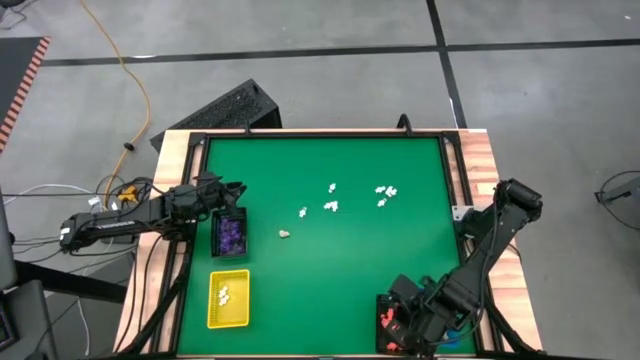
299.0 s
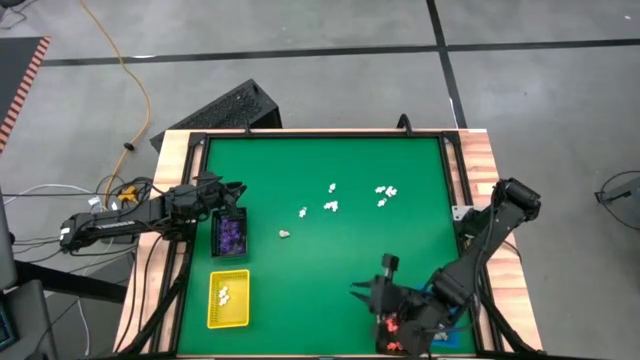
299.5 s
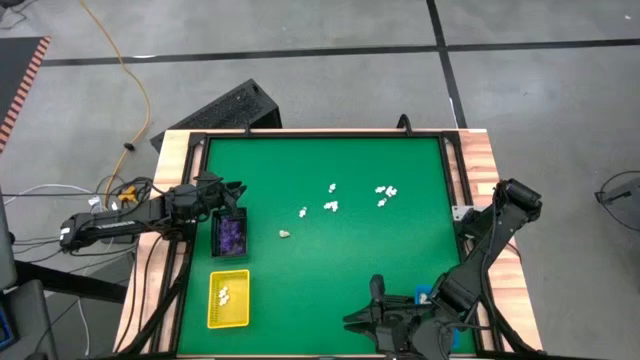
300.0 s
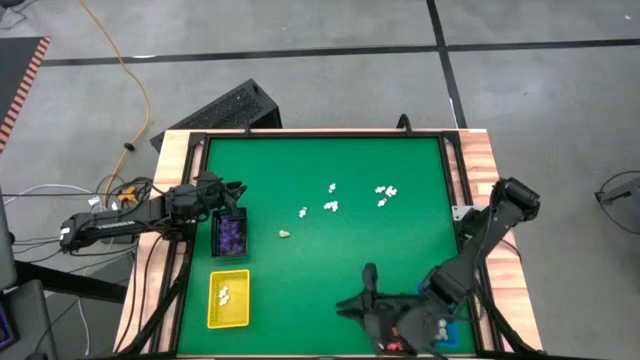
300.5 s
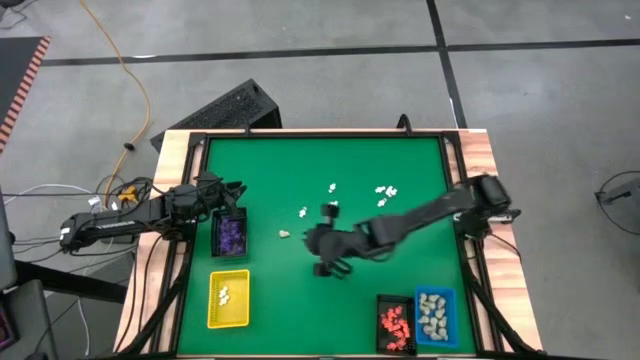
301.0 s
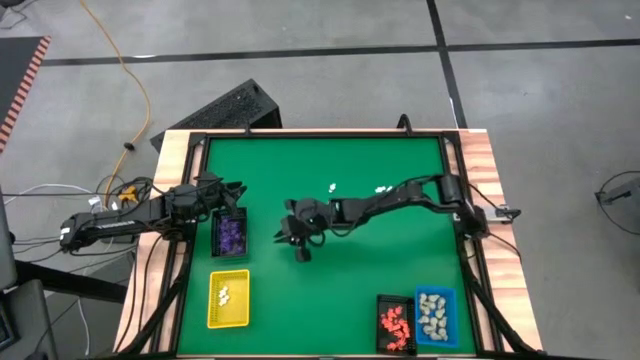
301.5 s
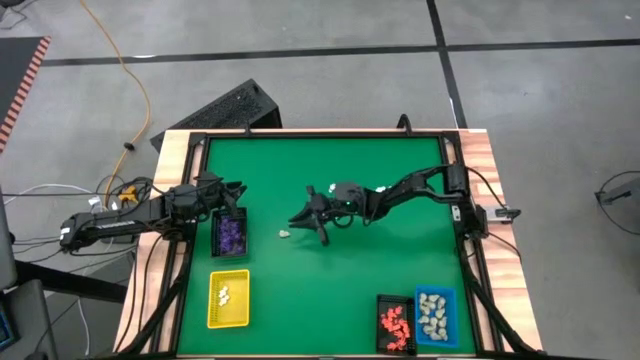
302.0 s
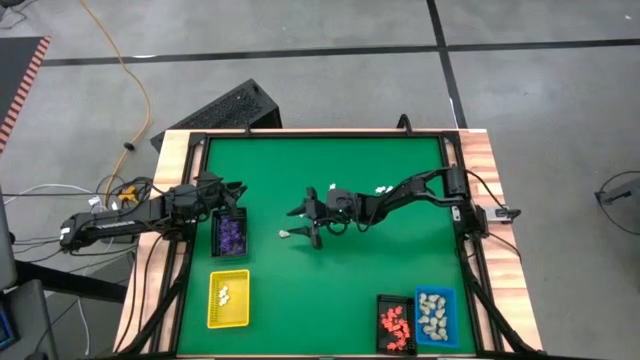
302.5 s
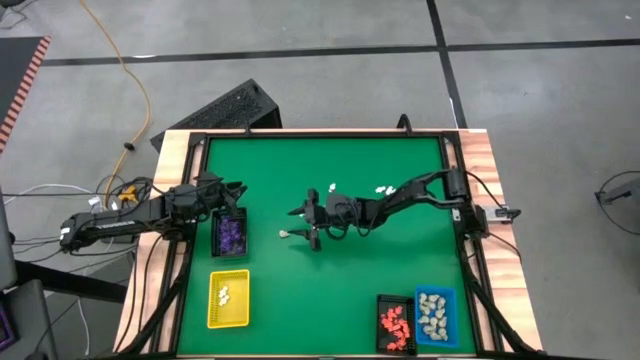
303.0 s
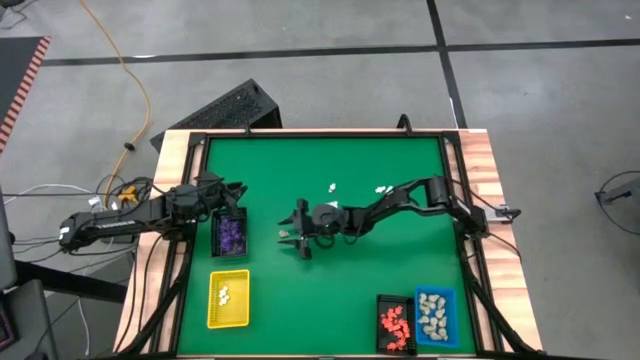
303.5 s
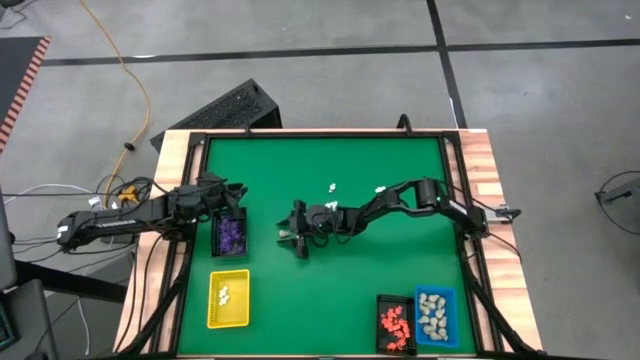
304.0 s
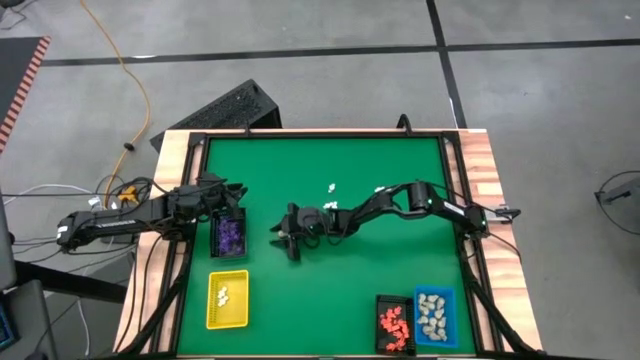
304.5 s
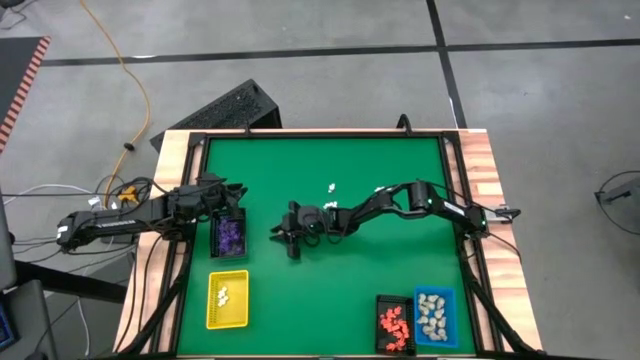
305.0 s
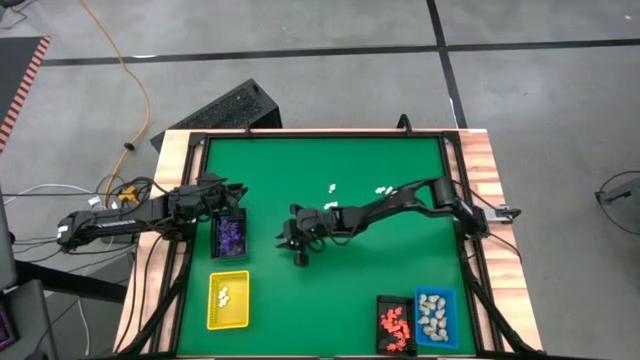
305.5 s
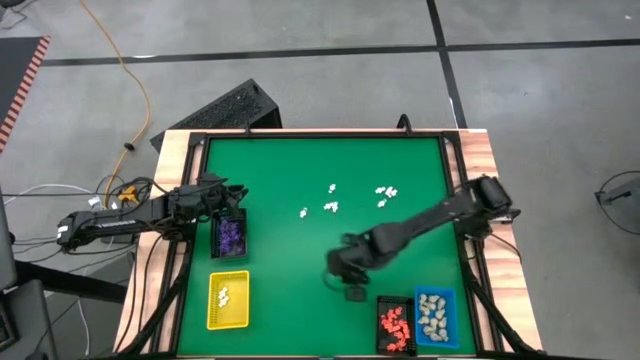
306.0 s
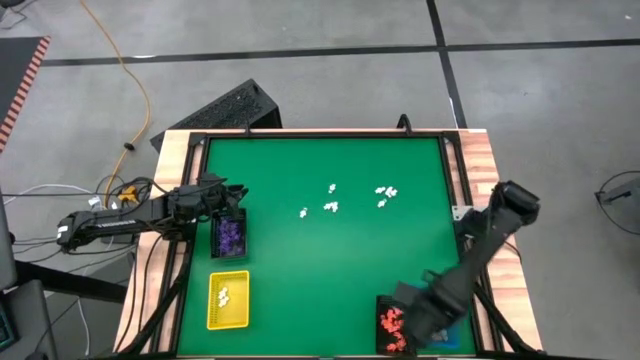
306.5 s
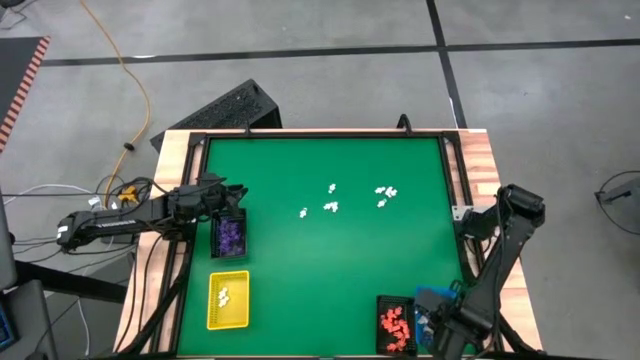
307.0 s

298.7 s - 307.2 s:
Task: Sort Halloween decoration
Put the white skull toy into the blue basket

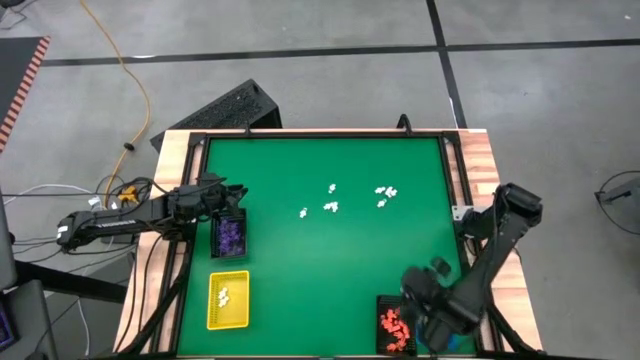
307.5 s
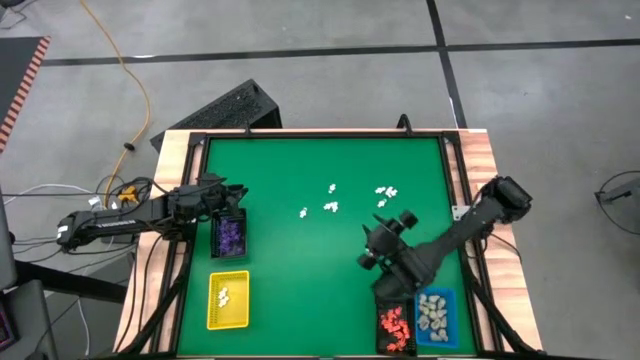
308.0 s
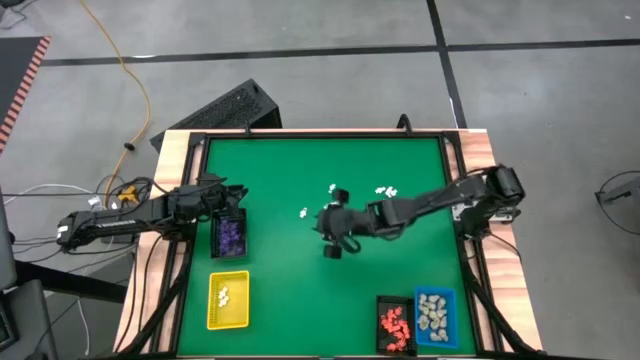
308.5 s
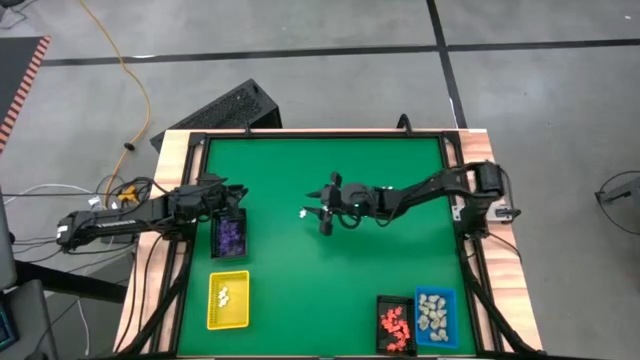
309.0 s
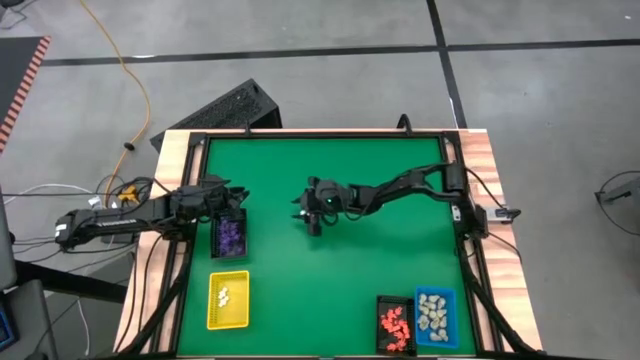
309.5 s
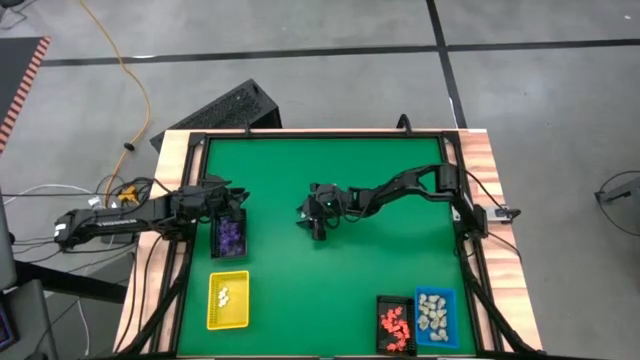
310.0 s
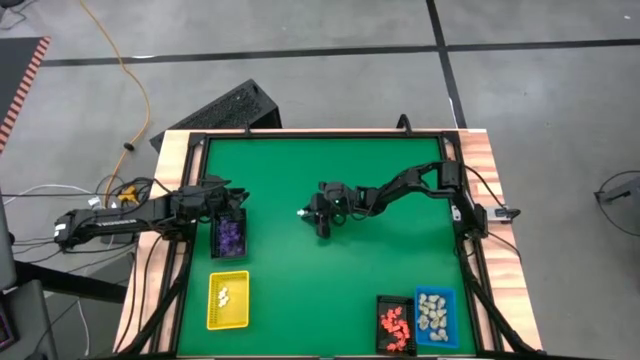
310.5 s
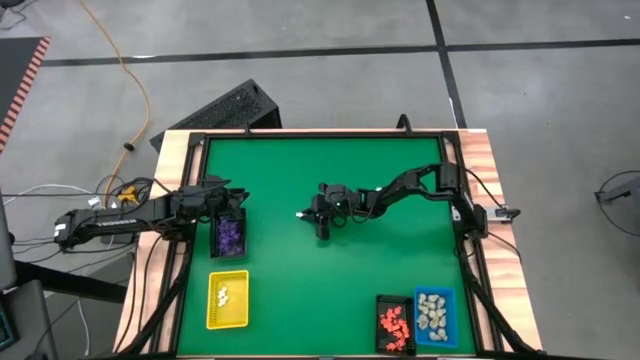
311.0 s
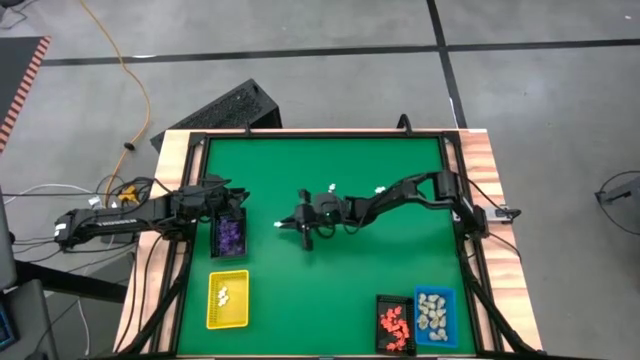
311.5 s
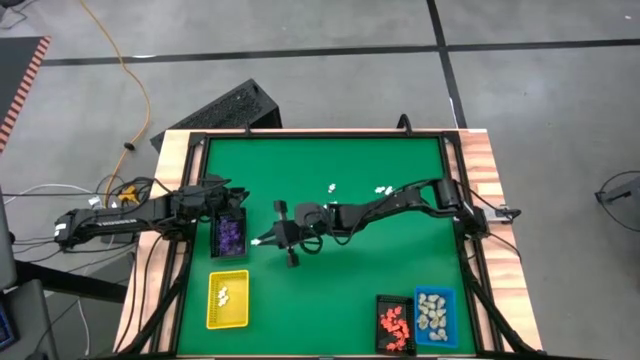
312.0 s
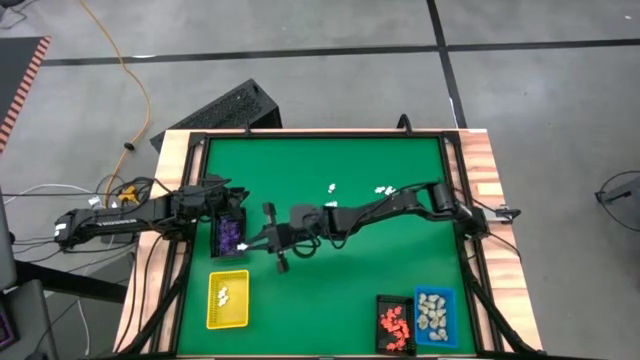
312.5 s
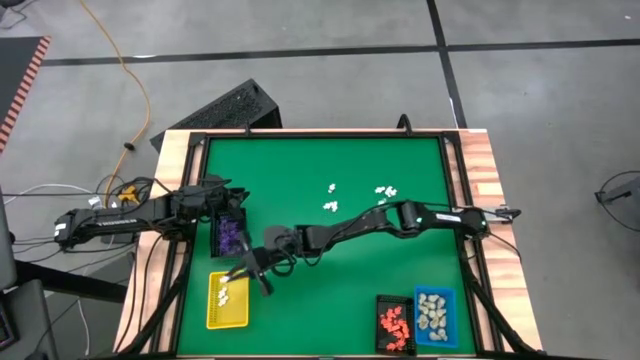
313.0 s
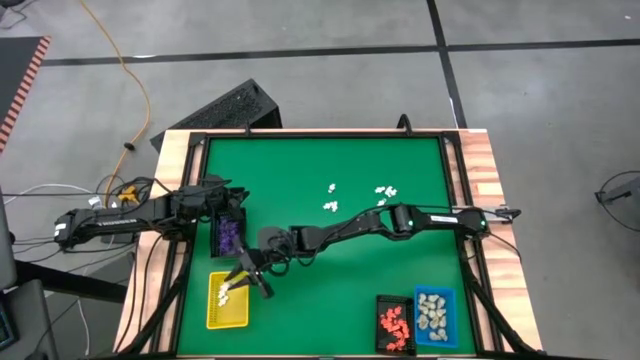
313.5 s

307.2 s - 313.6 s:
Put the white skeleton toy into the yellow basket

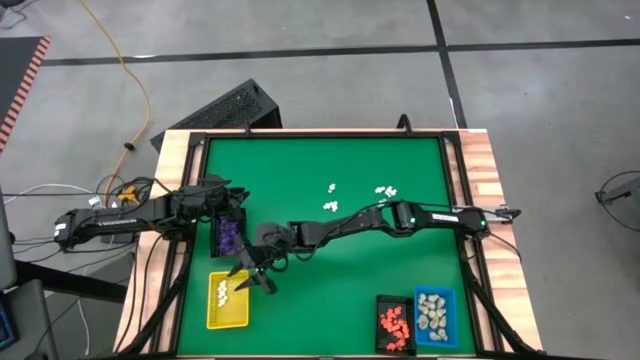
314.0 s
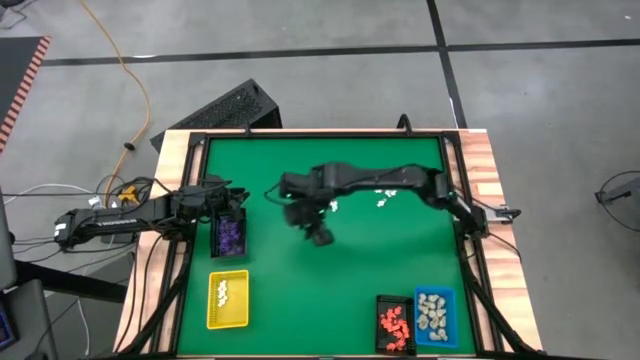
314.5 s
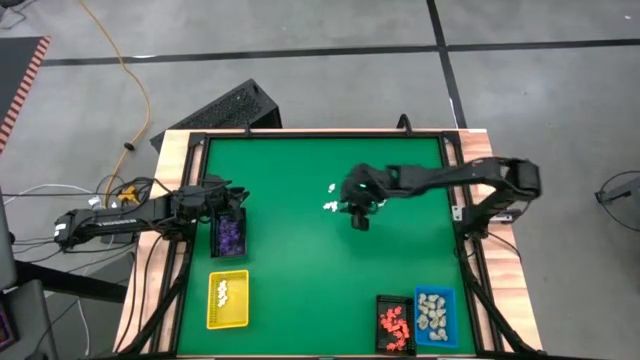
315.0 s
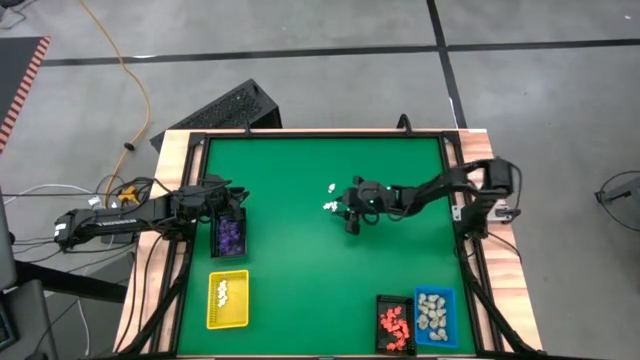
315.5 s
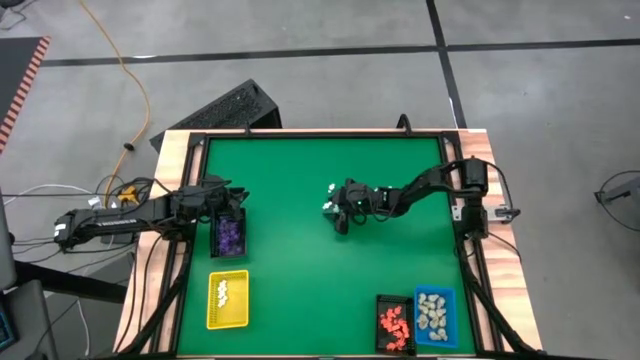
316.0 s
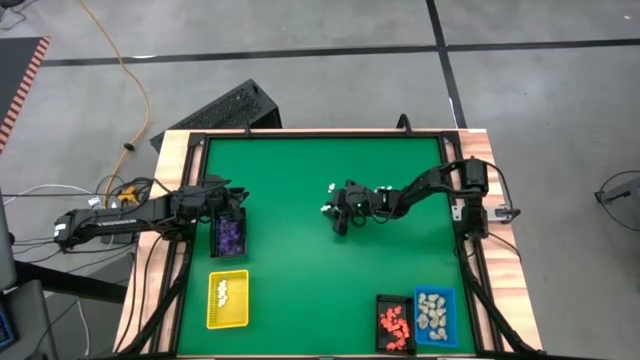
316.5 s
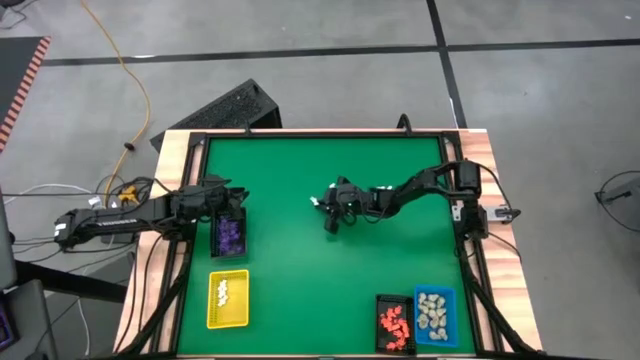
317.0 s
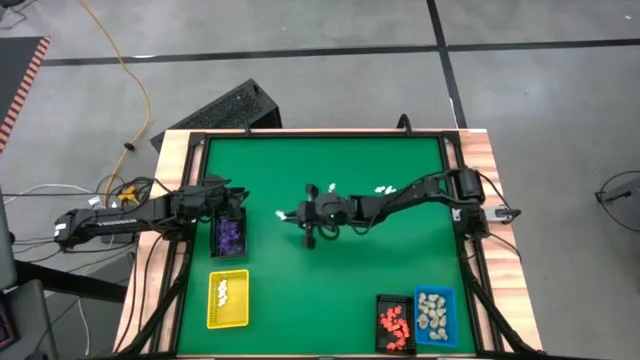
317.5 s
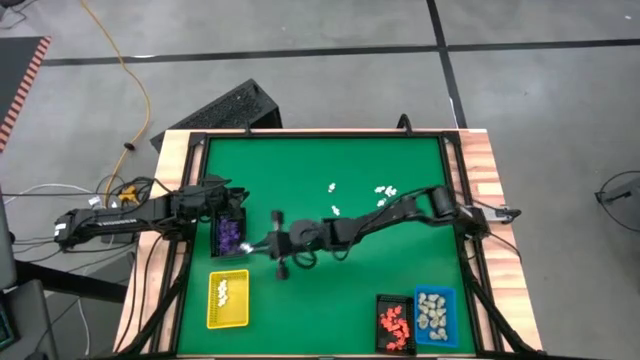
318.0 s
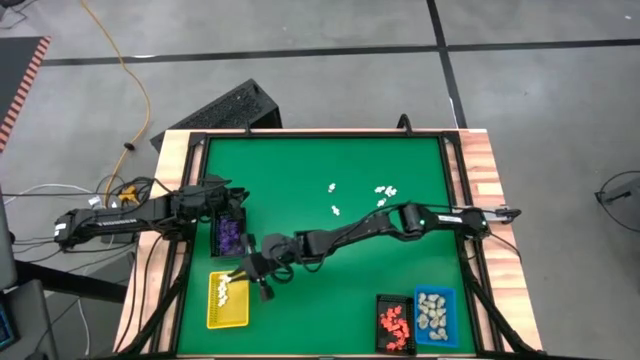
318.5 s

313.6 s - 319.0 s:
Put the white skeleton toy into the yellow basket

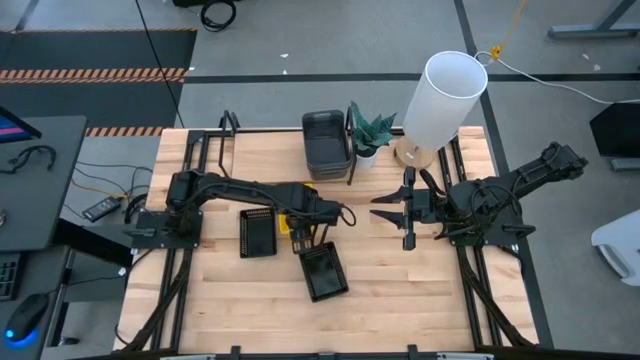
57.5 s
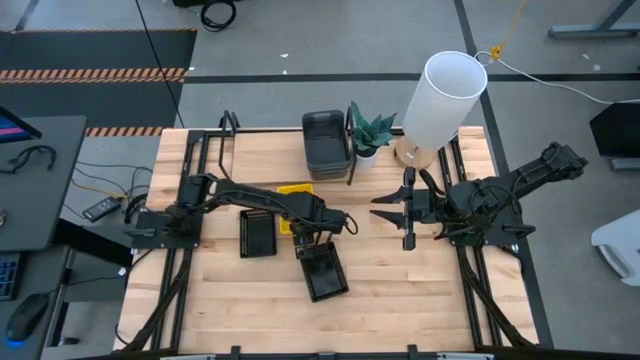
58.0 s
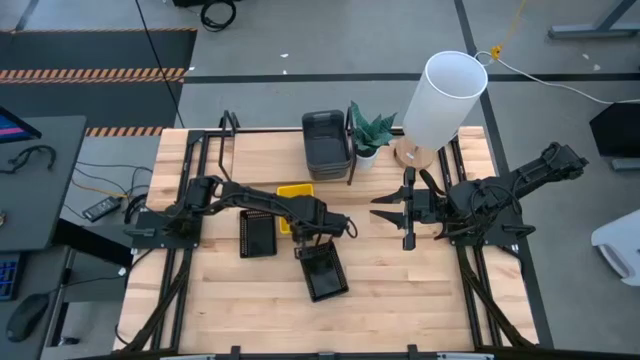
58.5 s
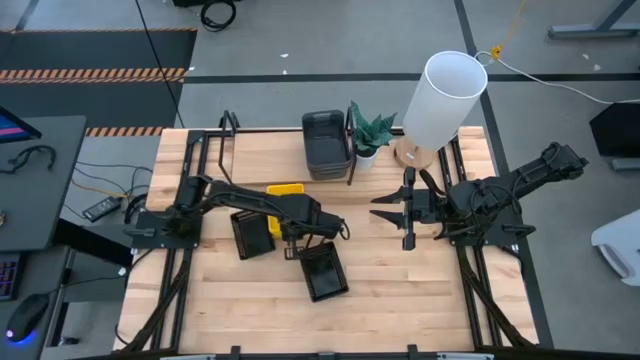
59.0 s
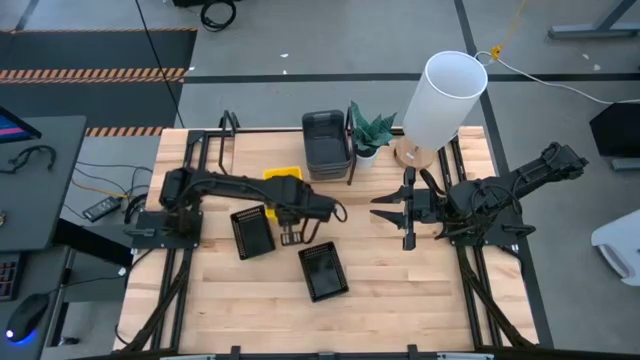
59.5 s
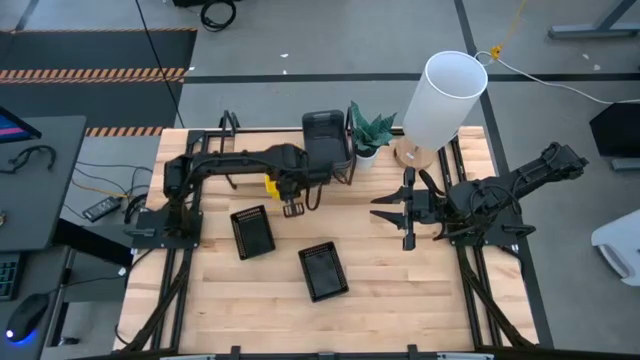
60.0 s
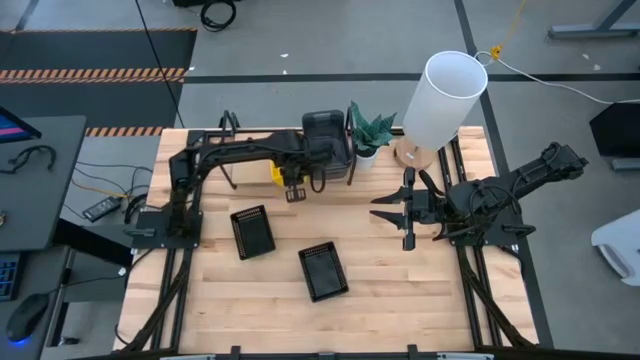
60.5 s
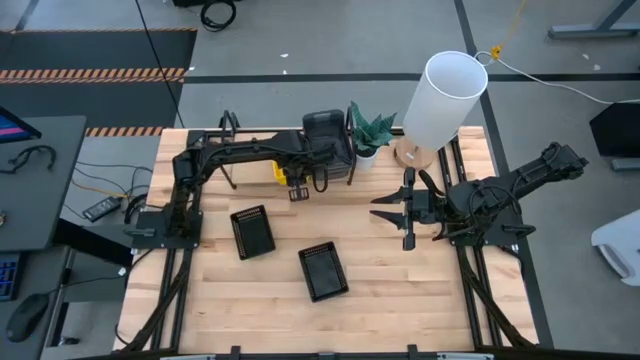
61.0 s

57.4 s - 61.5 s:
Task: Stack baskets on shelf by color
Put the stacked yellow bins on the shelf
